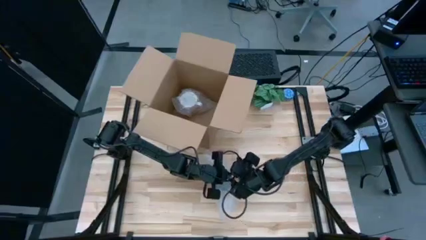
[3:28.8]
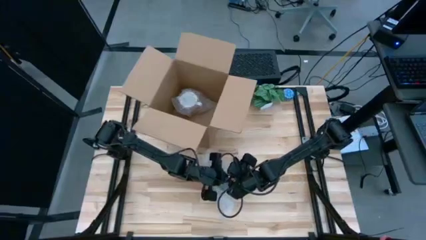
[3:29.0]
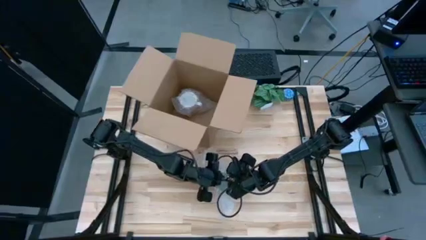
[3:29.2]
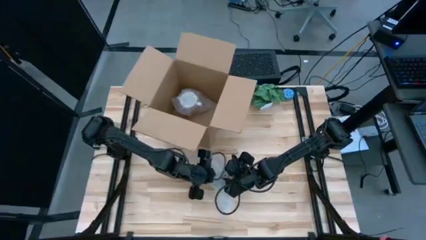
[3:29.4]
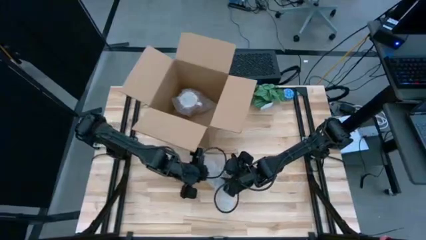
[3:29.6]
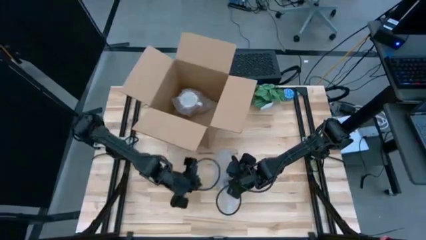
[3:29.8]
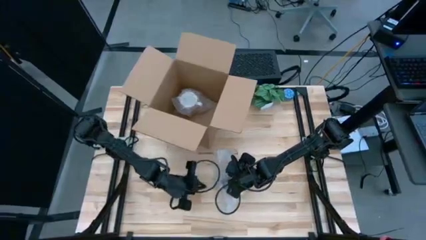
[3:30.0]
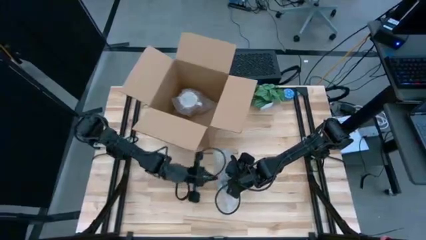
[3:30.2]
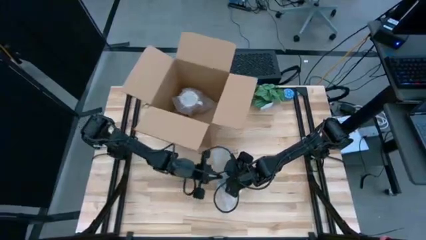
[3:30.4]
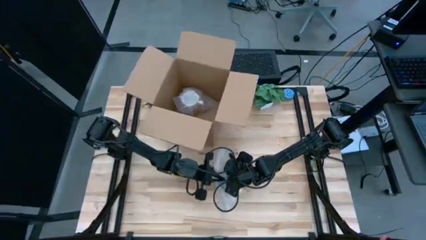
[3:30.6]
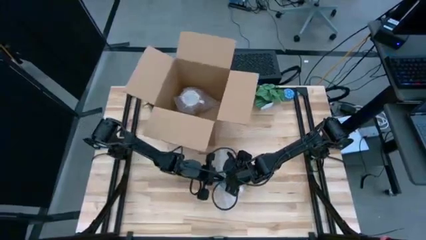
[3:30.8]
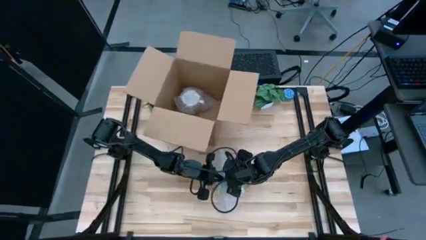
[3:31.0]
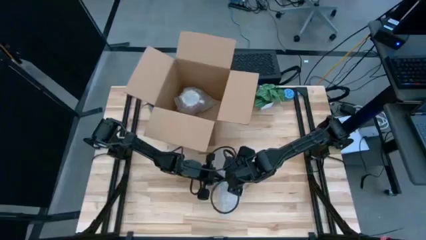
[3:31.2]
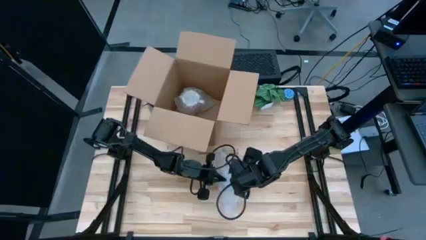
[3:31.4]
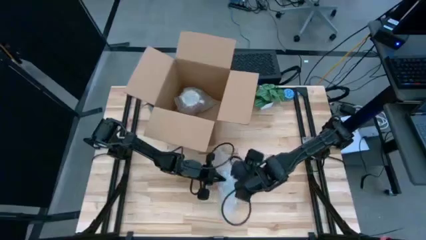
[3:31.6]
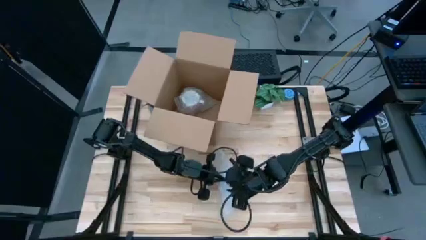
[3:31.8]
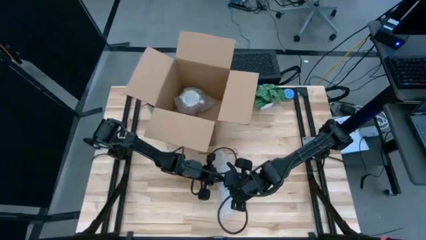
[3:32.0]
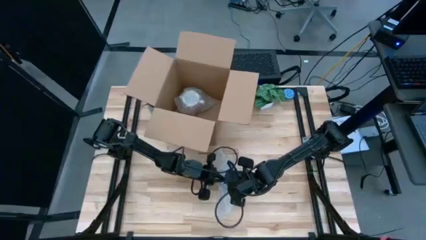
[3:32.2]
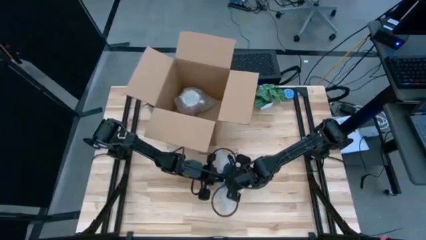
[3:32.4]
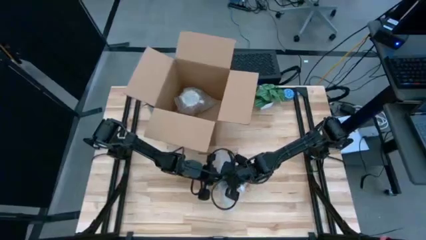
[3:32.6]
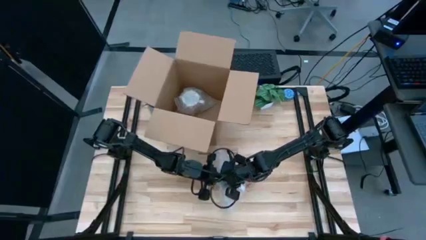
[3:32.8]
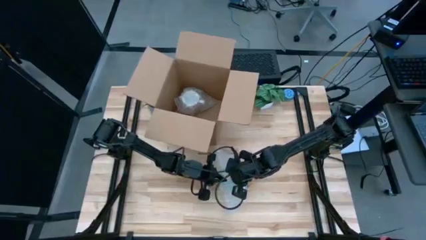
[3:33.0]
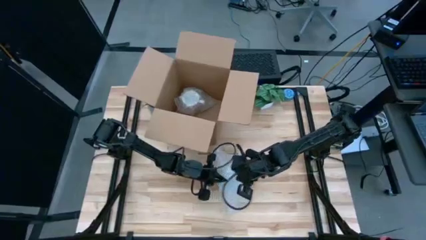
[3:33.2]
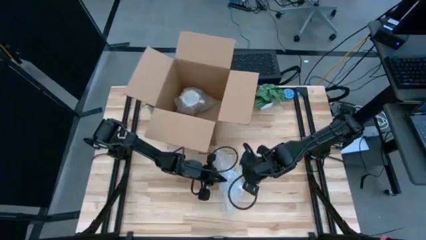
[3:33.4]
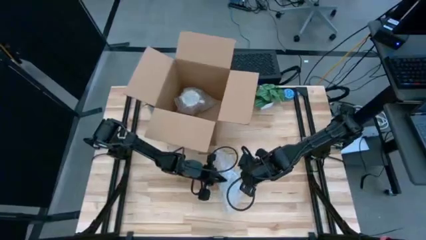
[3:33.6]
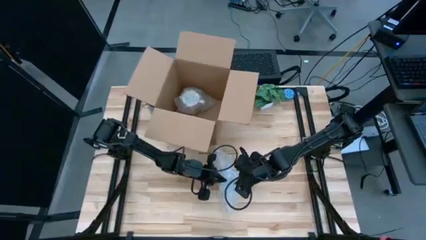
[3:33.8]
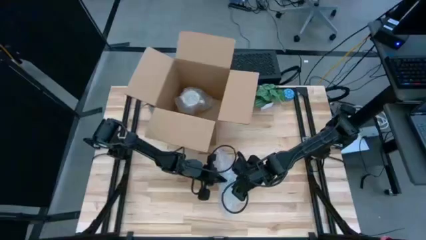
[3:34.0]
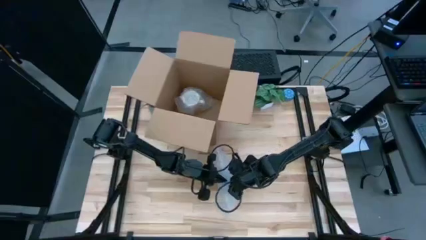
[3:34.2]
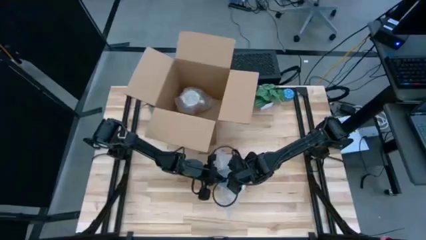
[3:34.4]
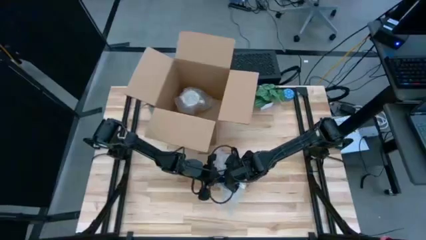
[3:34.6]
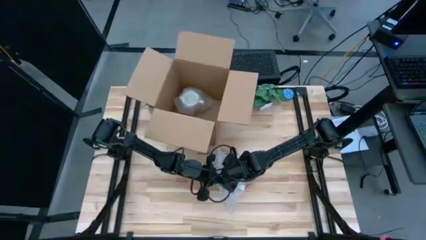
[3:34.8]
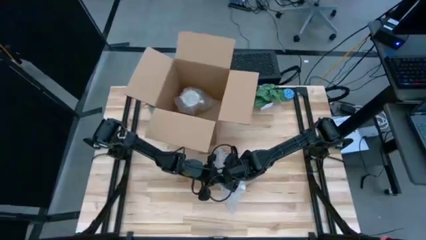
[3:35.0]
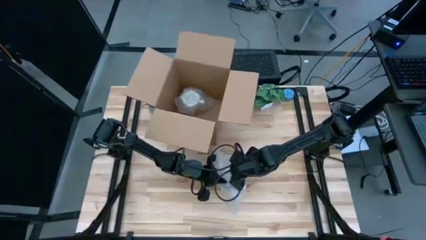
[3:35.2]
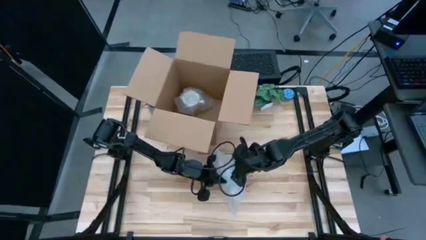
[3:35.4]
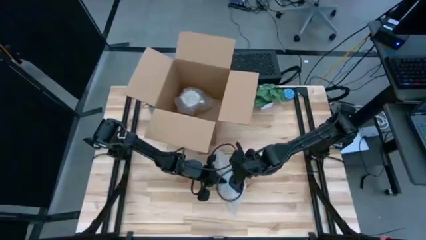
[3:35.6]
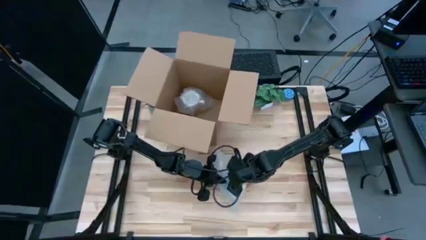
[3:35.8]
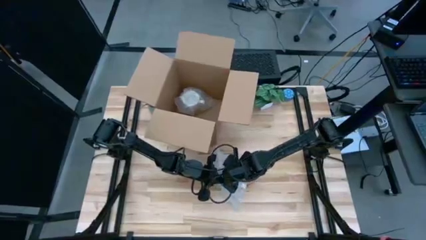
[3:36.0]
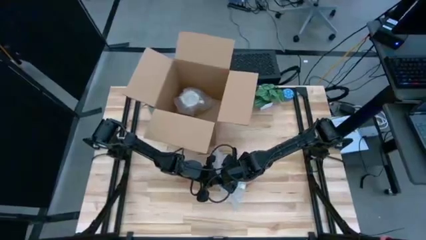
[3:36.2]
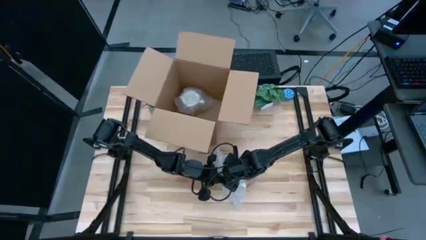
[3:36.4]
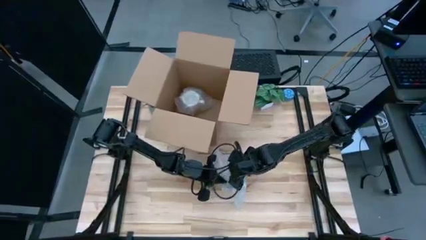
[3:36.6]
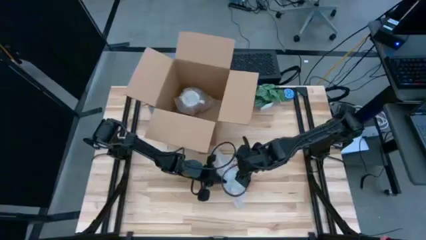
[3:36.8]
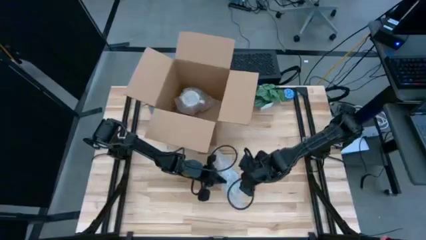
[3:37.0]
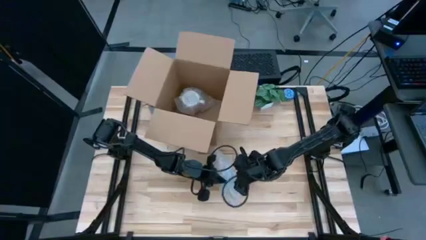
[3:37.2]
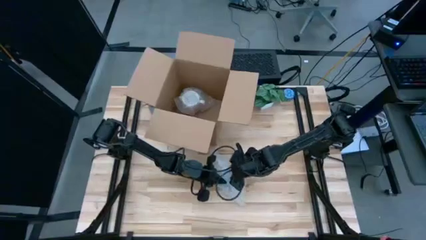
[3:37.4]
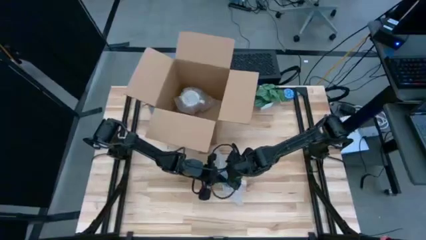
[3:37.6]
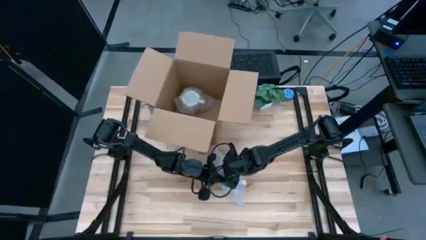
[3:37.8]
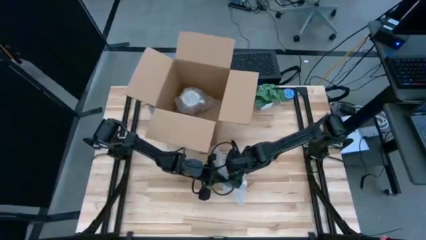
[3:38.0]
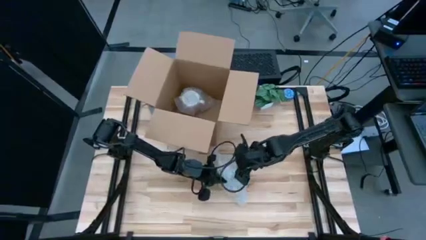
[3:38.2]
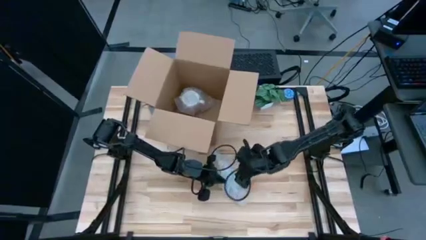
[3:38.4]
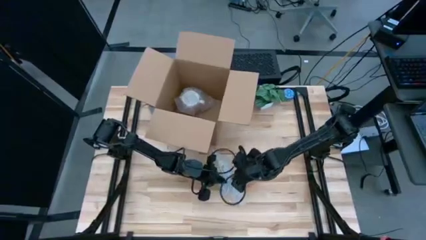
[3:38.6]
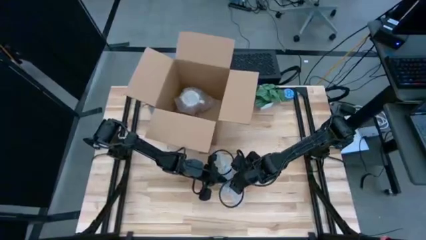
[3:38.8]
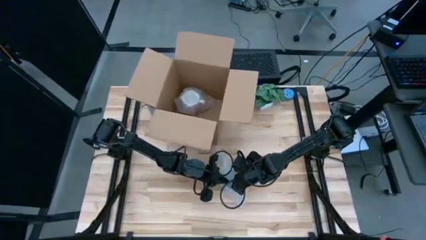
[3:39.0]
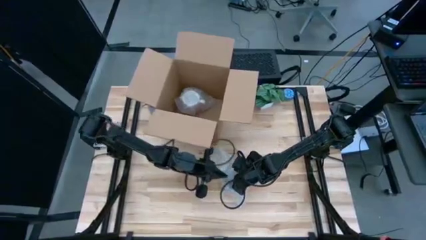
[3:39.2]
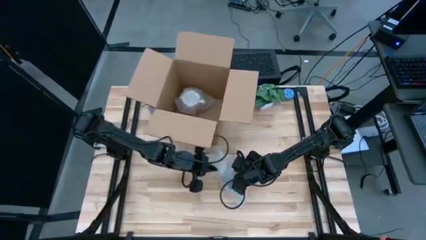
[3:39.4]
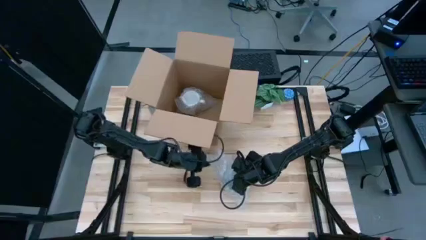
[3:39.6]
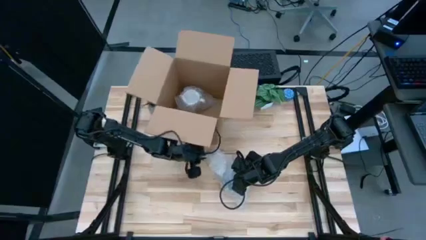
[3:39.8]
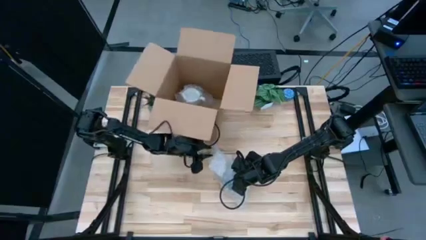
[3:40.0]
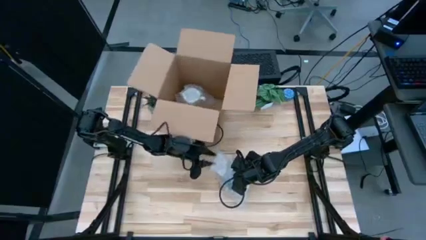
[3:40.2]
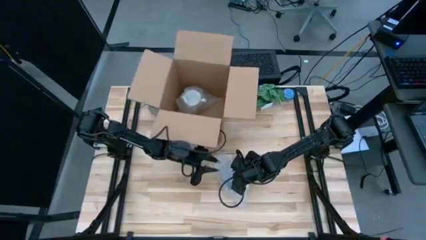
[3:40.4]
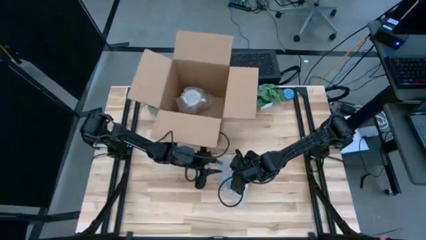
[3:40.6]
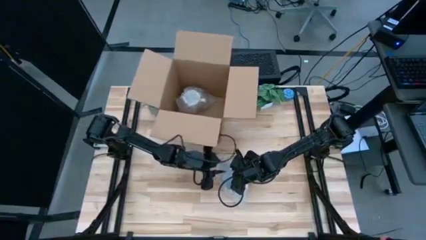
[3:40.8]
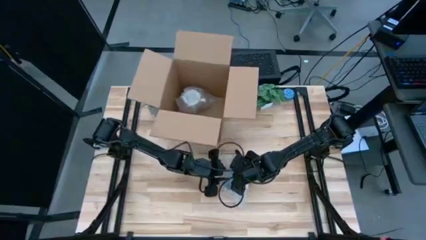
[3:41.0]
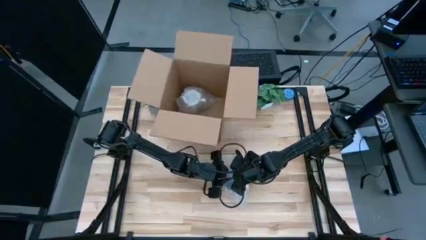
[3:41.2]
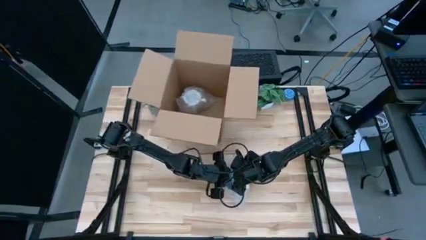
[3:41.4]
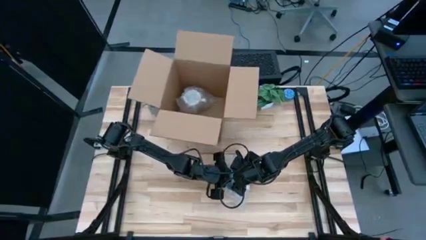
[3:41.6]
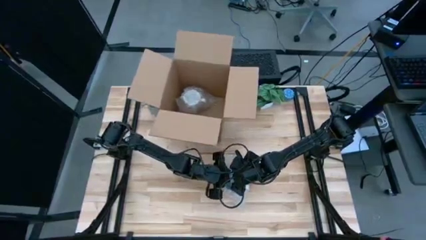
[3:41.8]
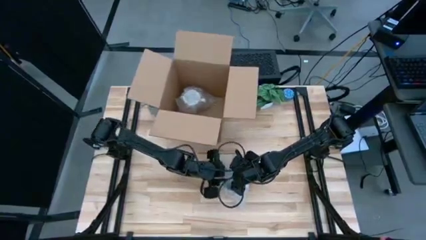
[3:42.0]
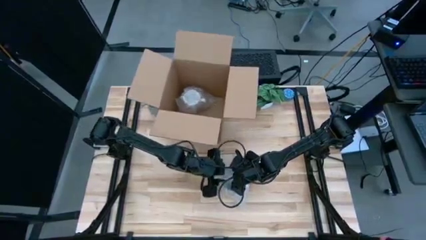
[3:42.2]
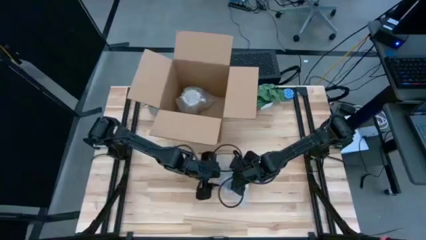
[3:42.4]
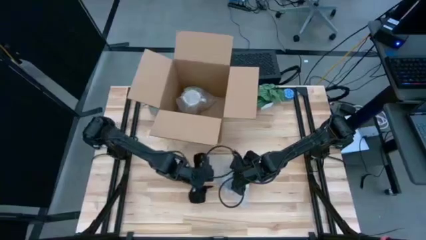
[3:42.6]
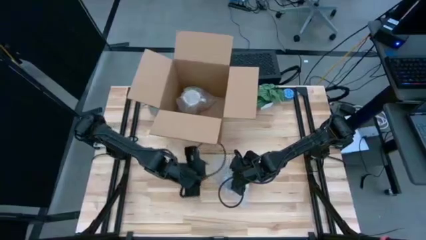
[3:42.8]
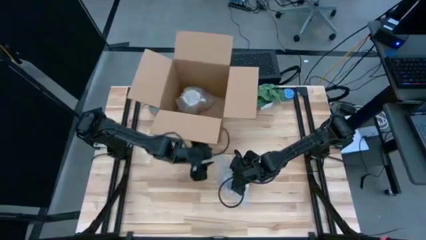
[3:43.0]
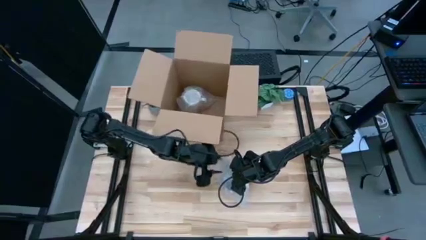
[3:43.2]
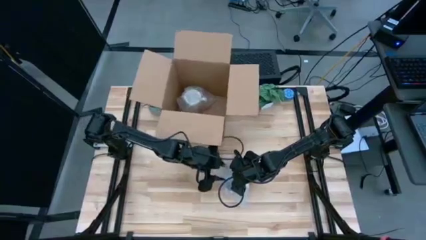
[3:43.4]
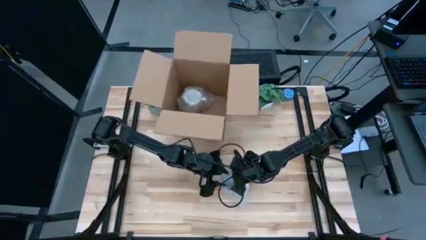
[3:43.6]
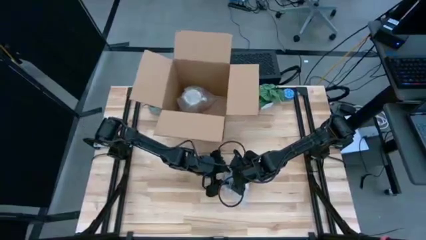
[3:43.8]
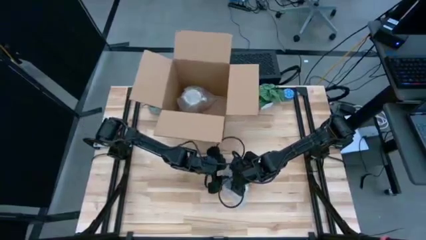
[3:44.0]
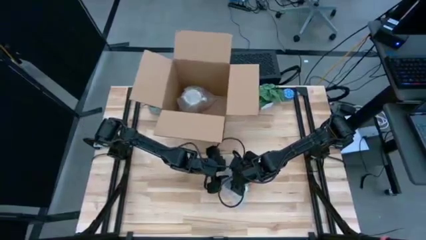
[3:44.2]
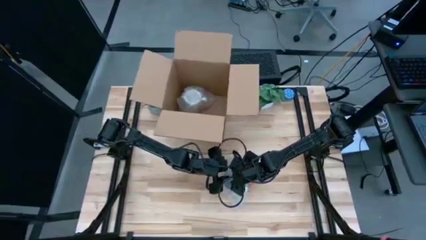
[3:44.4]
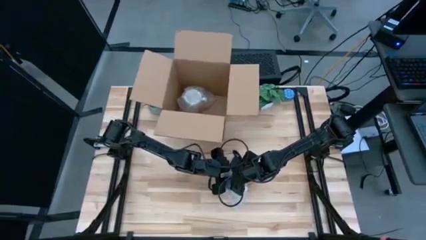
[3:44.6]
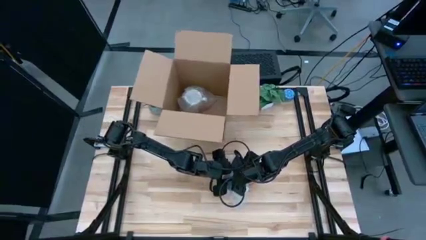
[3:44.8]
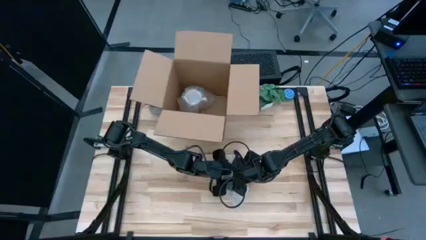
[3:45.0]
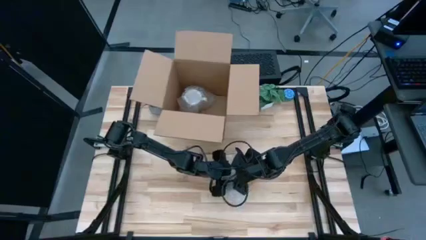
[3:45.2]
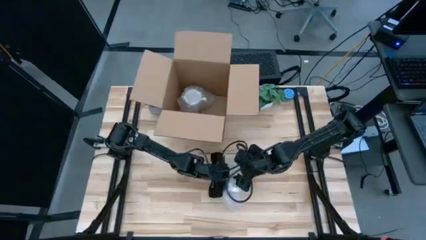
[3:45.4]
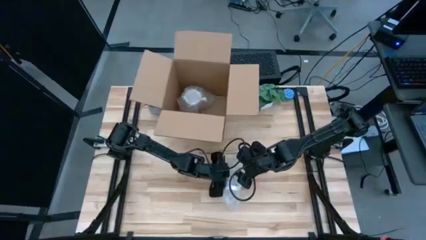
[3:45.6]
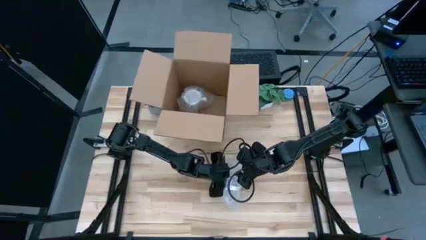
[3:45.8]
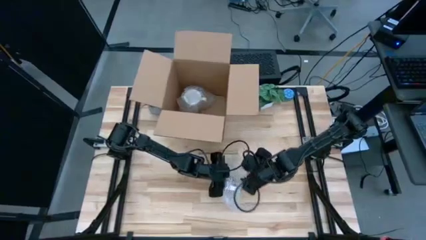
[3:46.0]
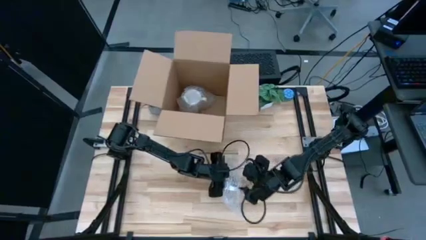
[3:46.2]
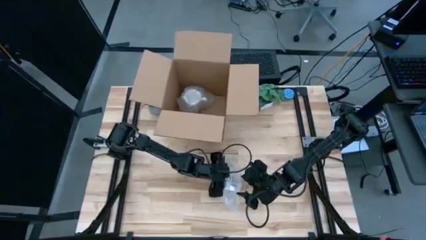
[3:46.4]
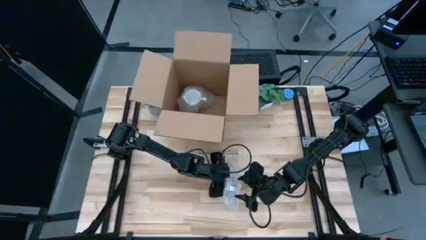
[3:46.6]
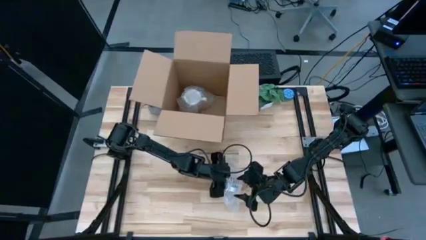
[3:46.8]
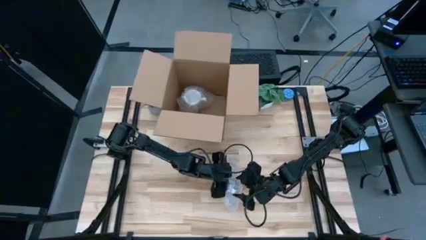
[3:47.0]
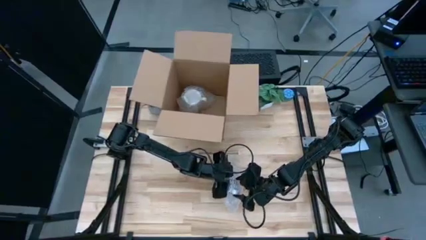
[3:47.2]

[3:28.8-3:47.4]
Task: wrap mug
Wrap the red mug with bubble wrap
